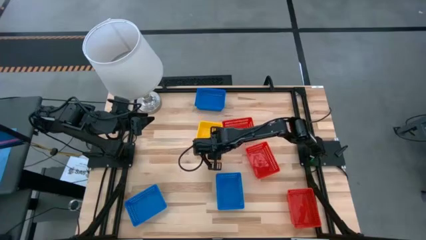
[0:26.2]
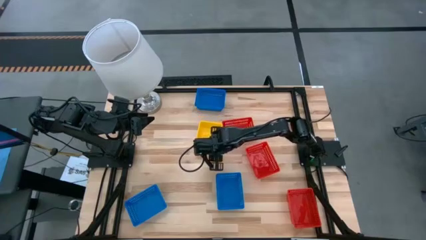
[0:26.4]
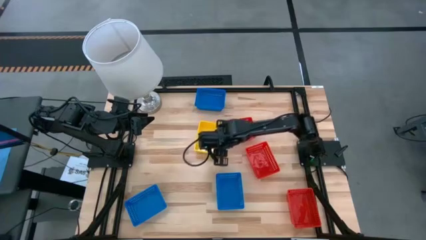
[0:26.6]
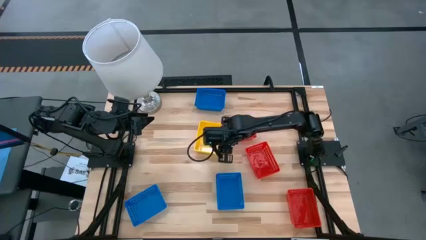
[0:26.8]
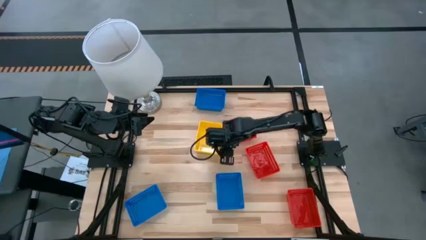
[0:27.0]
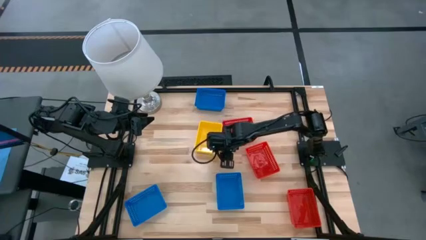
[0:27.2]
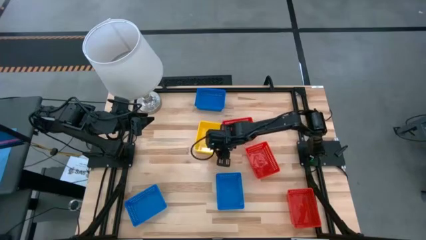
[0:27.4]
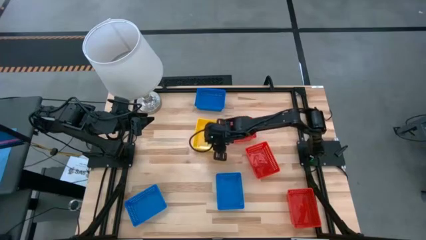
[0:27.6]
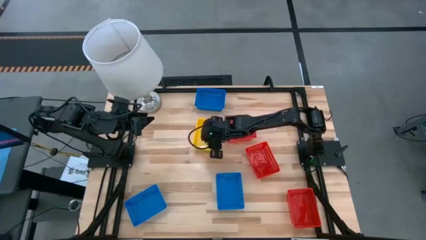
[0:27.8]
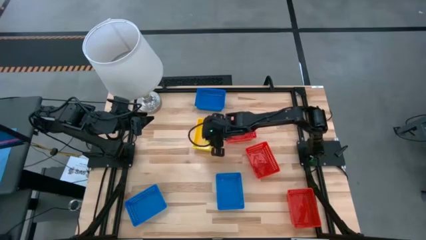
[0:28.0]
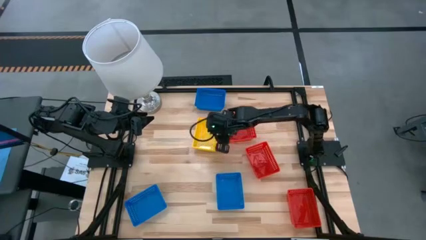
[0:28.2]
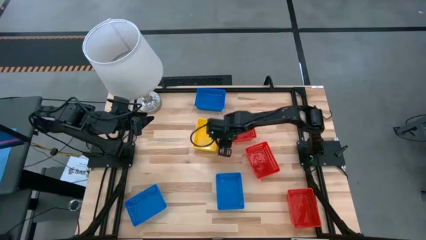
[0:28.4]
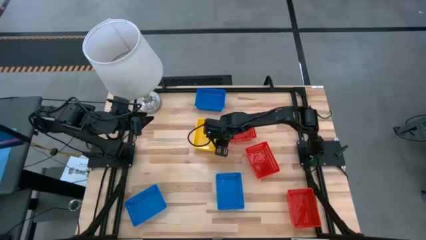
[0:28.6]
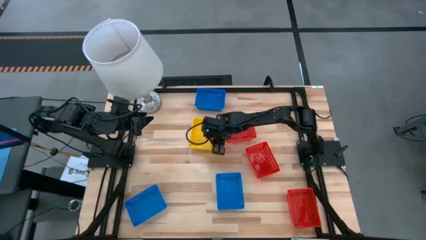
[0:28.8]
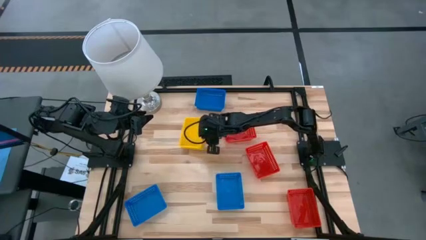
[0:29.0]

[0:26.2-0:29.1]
Move the yellow baskets to the left of the table

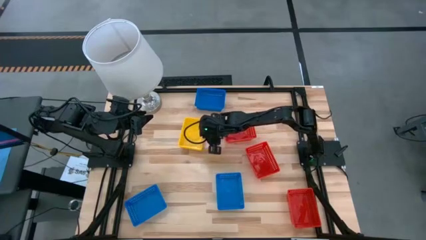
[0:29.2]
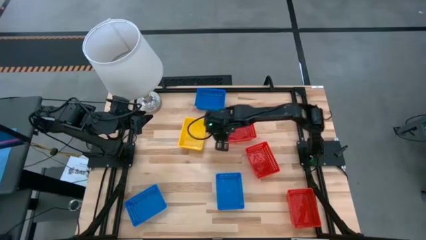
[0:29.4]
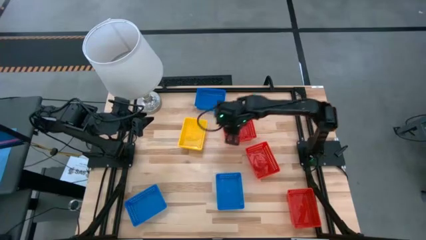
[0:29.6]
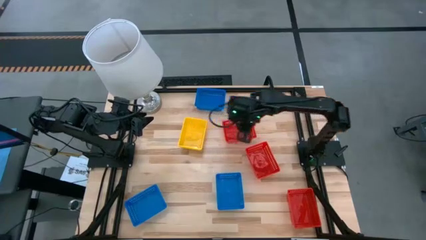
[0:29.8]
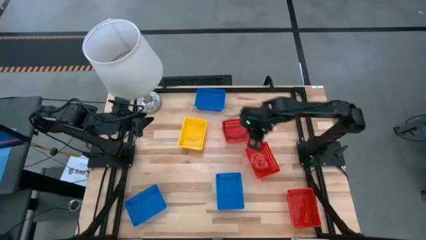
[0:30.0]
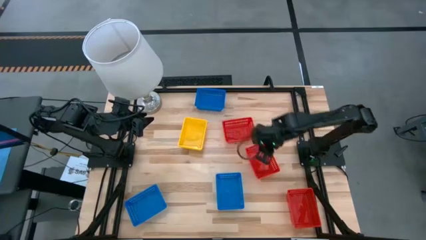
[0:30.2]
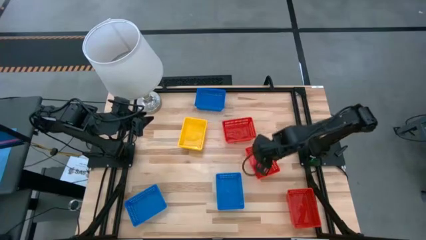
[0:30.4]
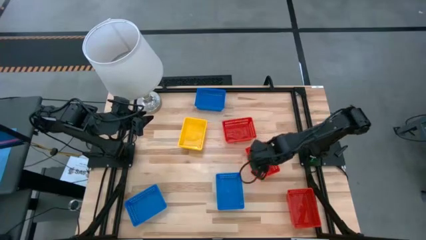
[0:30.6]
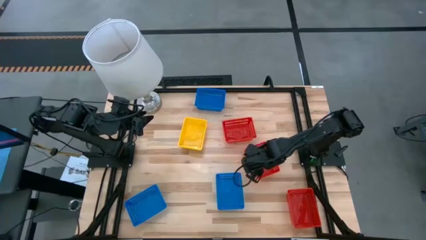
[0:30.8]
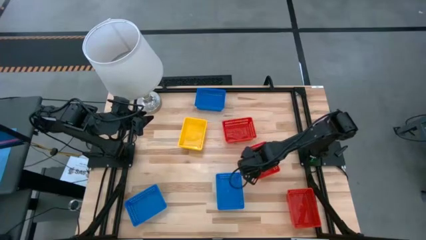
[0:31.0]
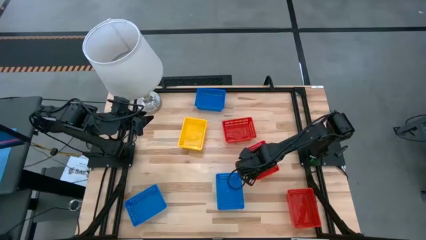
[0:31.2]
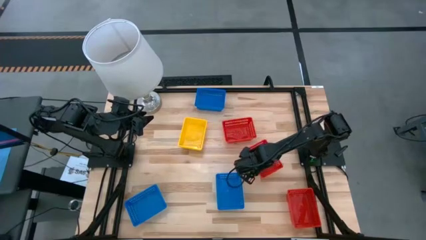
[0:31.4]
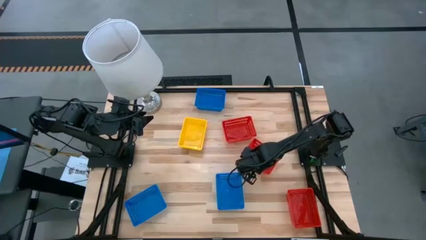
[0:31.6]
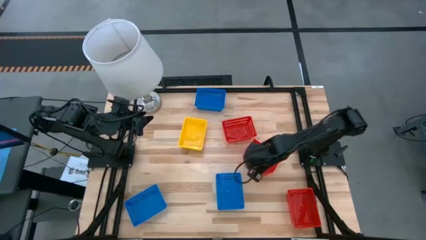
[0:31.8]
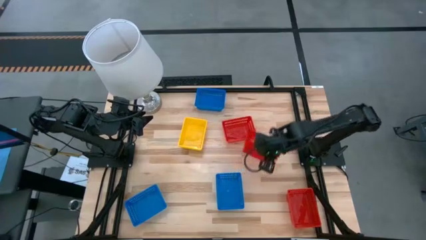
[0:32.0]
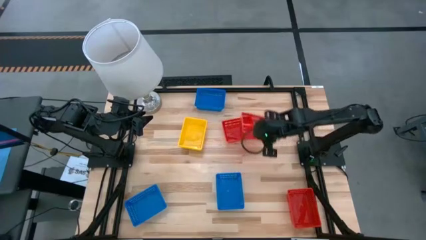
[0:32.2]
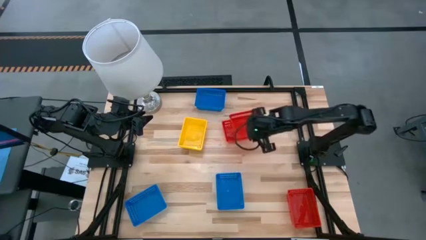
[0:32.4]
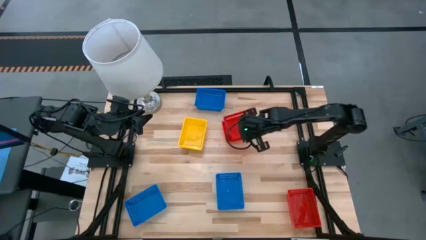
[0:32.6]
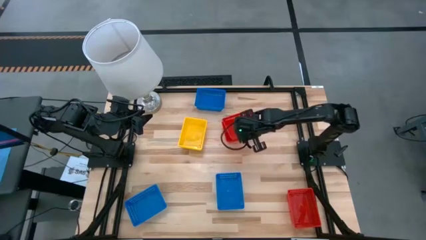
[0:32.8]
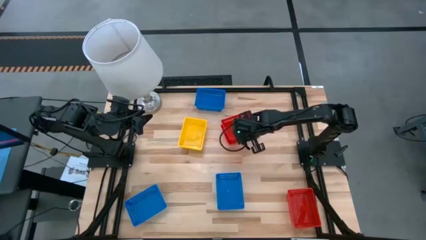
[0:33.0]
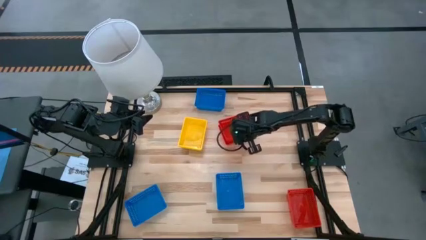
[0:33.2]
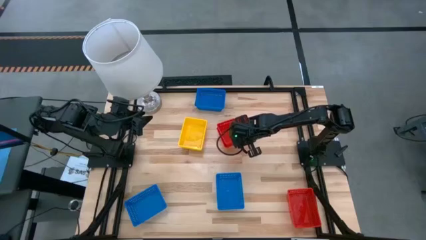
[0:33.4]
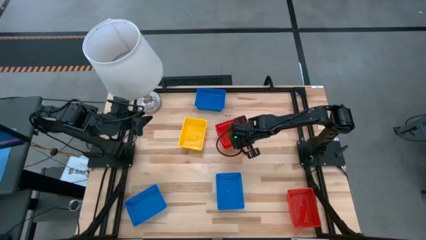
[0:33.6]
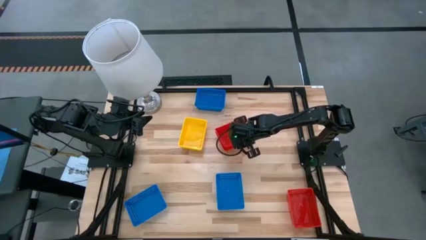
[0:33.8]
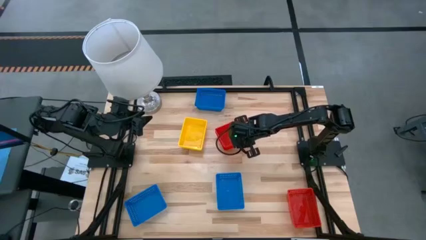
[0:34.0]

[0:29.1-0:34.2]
Stack the center red basket on the top red basket

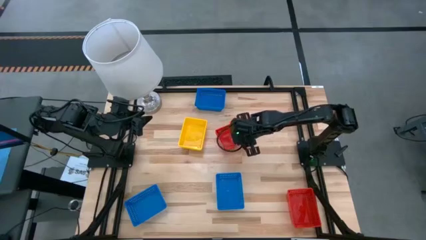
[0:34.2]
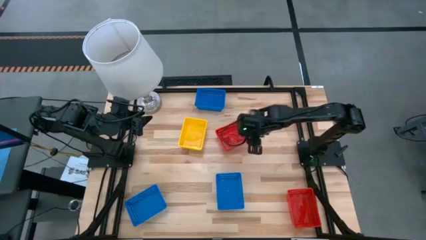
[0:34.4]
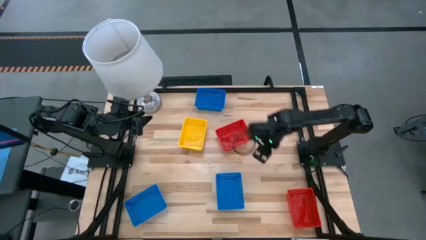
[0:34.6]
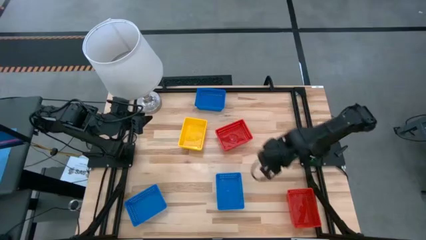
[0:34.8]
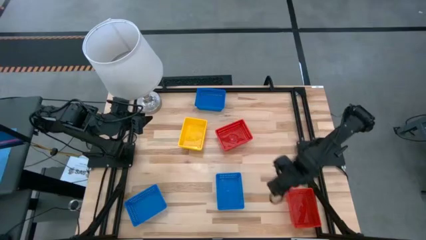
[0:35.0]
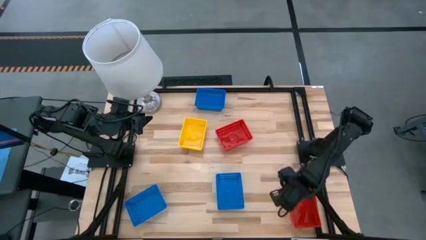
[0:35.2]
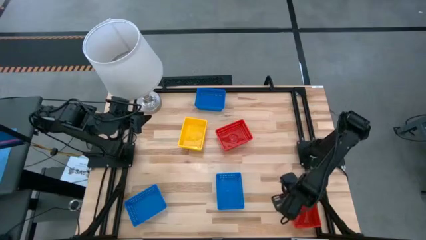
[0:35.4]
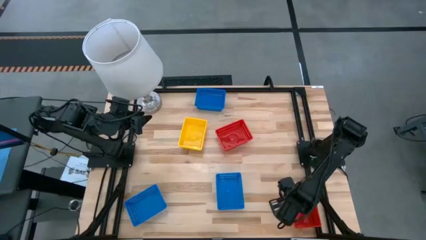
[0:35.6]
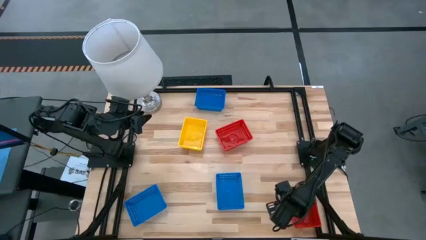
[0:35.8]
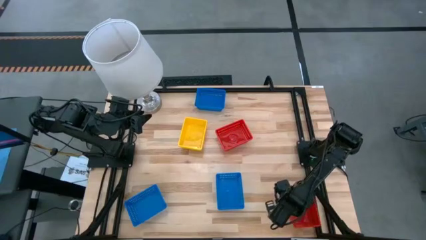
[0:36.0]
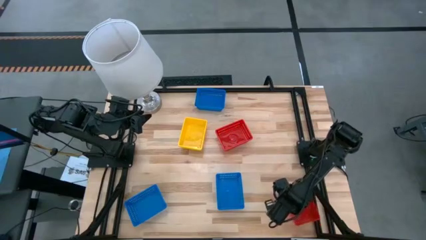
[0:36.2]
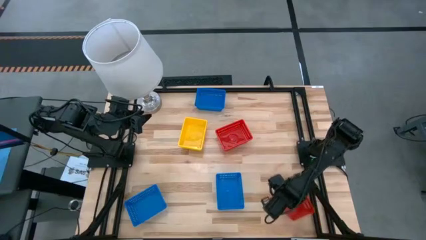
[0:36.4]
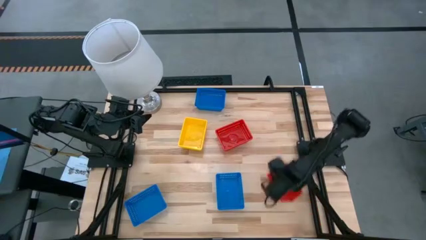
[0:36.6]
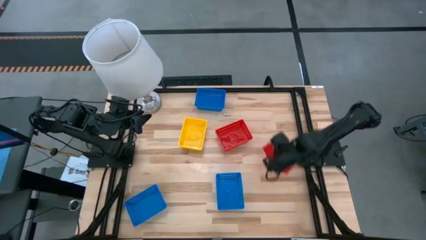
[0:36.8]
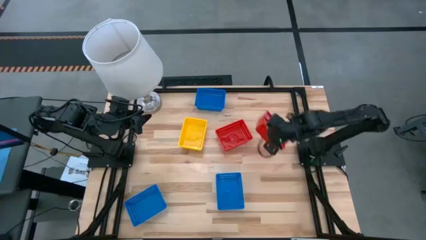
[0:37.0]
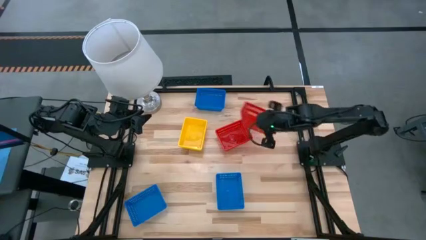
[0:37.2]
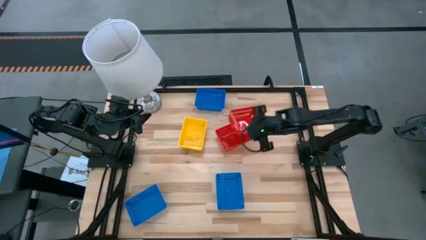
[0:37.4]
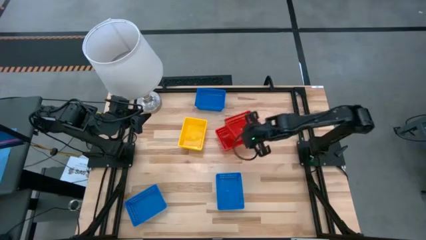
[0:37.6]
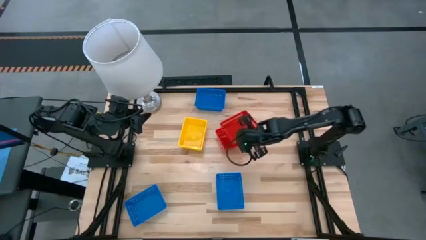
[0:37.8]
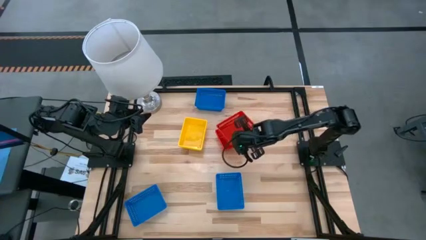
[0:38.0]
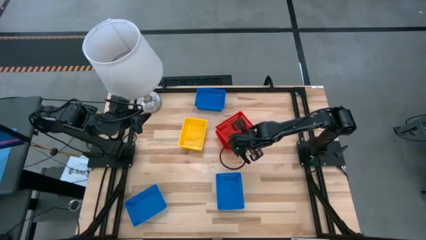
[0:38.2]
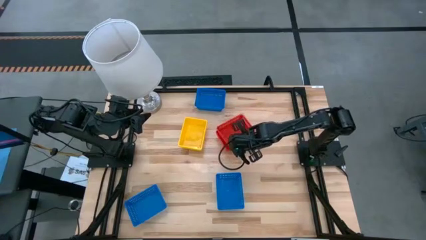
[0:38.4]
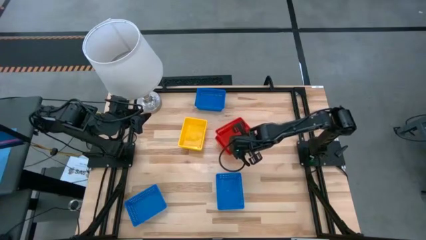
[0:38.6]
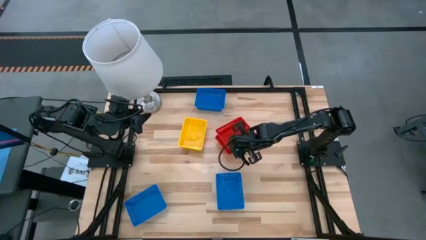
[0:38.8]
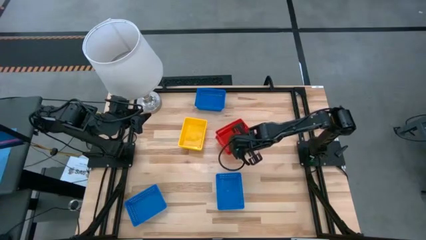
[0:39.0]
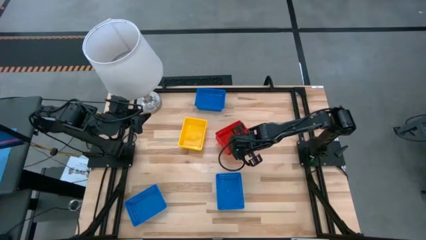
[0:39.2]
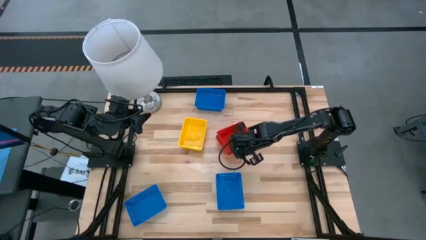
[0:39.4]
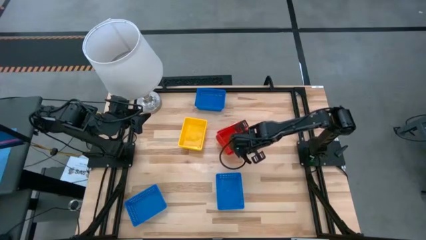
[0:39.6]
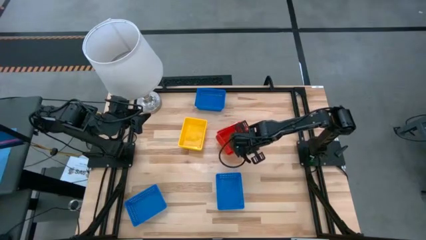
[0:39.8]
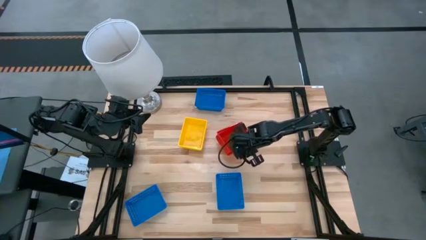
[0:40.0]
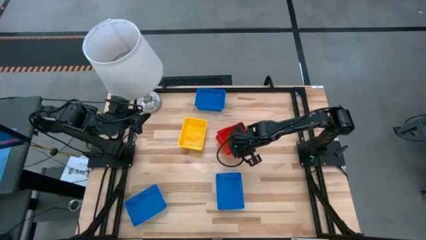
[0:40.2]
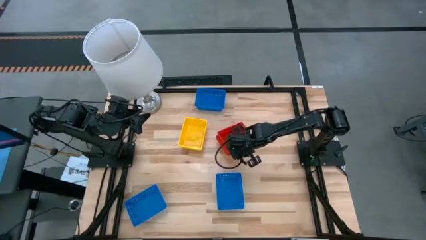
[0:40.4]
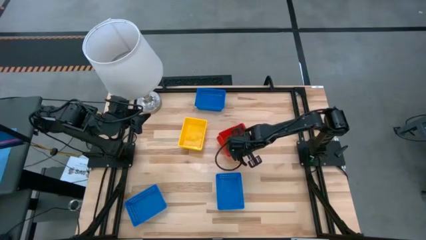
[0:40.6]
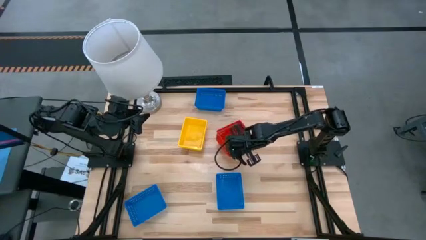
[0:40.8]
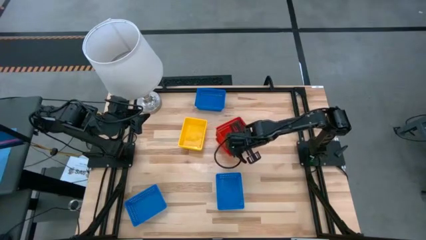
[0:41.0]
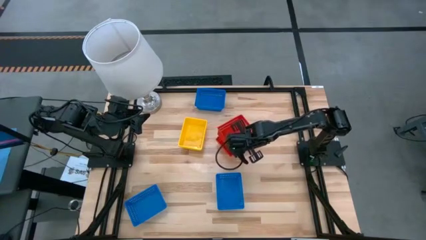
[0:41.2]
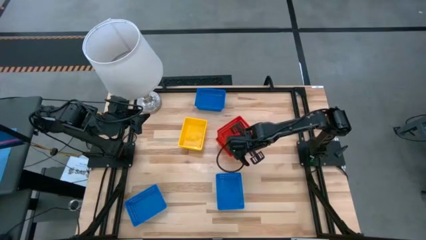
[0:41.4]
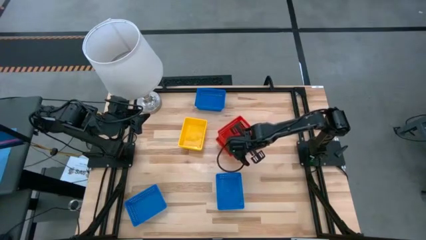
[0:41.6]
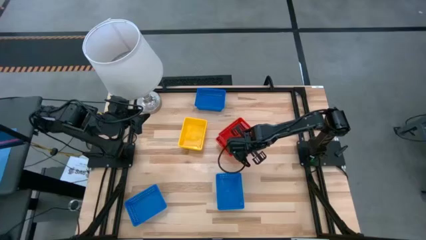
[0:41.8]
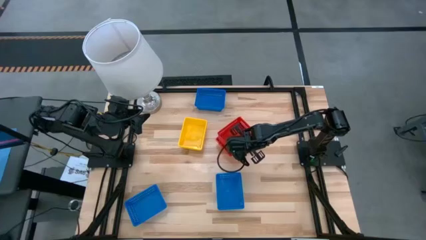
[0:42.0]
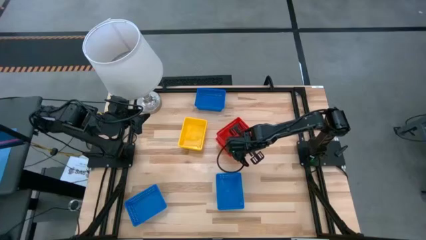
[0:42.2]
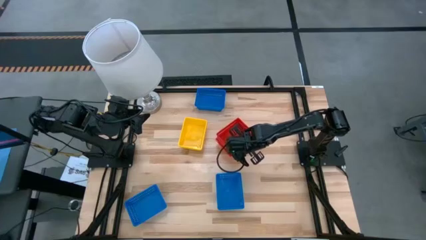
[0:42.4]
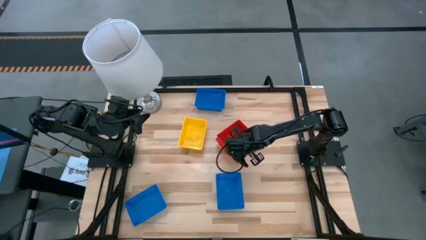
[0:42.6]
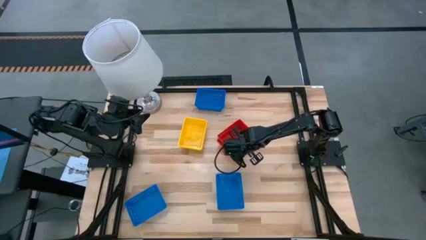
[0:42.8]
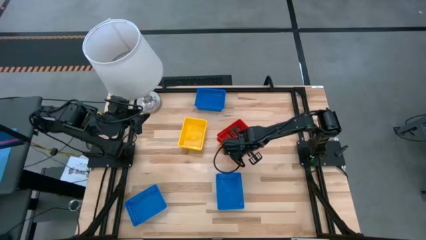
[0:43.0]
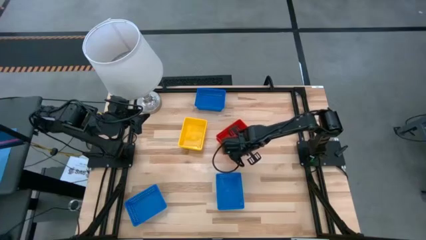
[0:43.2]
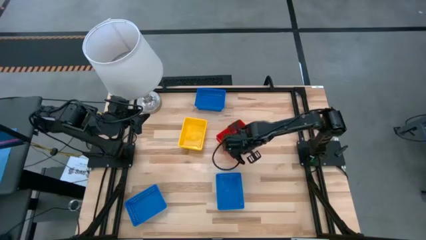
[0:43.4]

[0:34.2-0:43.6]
Stack the bottom red basket on the top red basket
